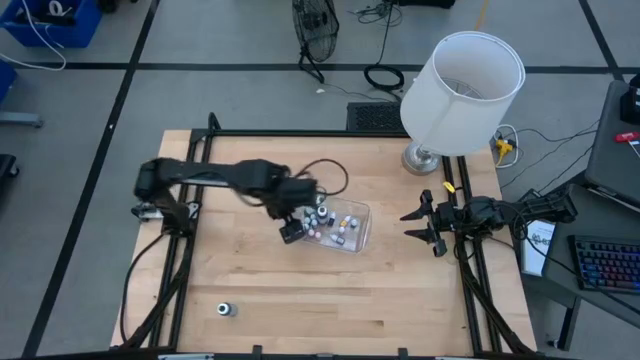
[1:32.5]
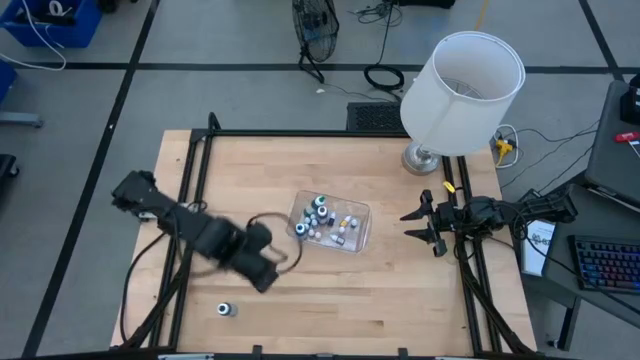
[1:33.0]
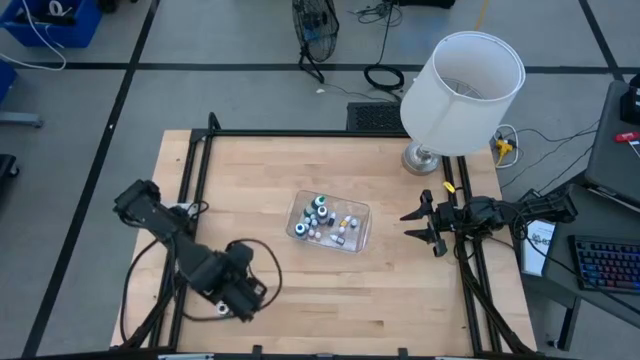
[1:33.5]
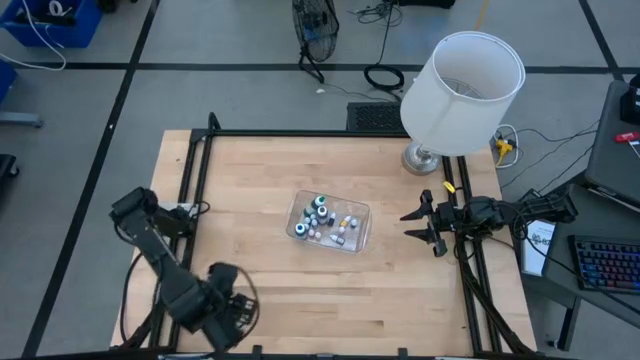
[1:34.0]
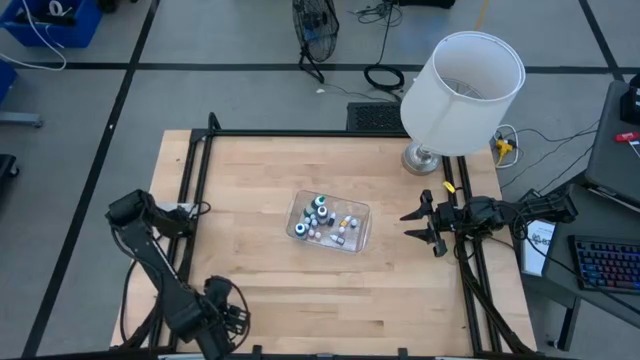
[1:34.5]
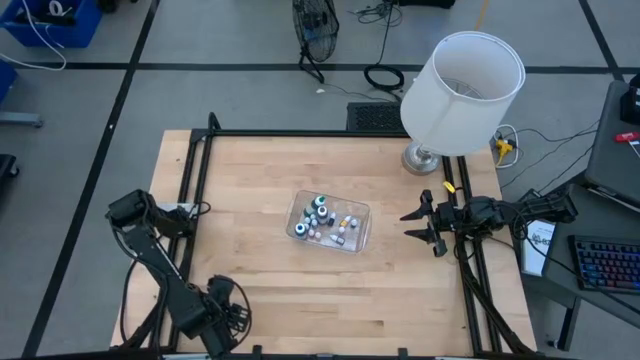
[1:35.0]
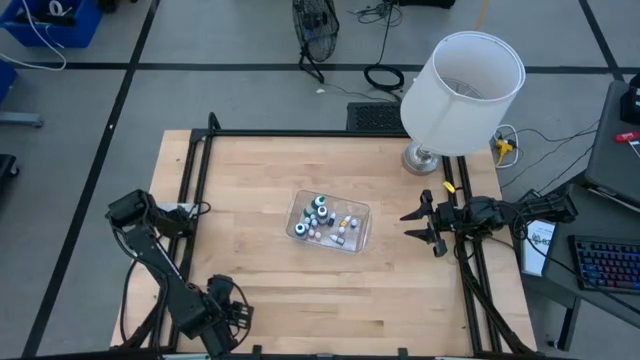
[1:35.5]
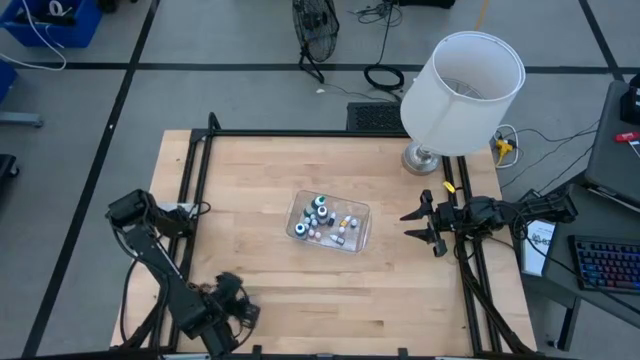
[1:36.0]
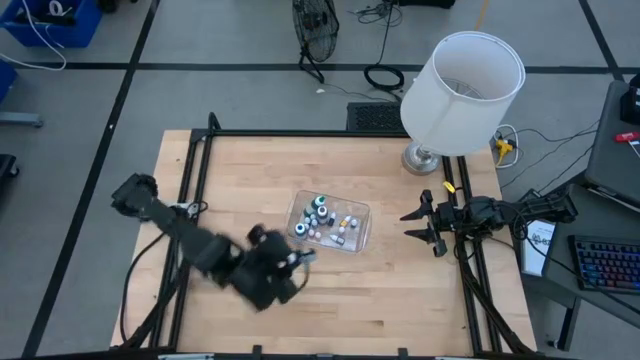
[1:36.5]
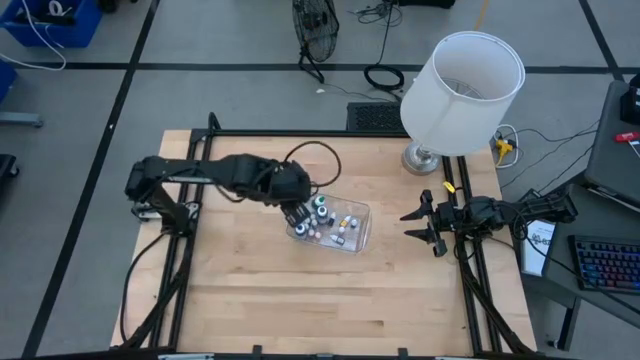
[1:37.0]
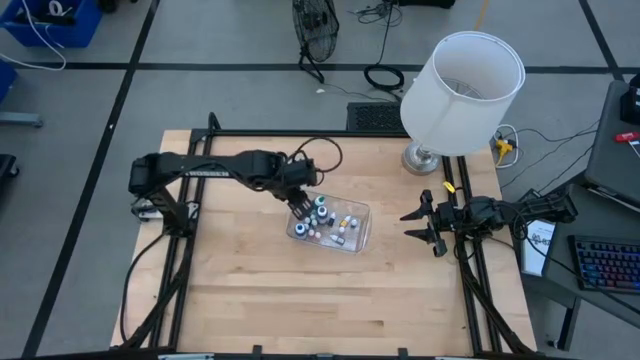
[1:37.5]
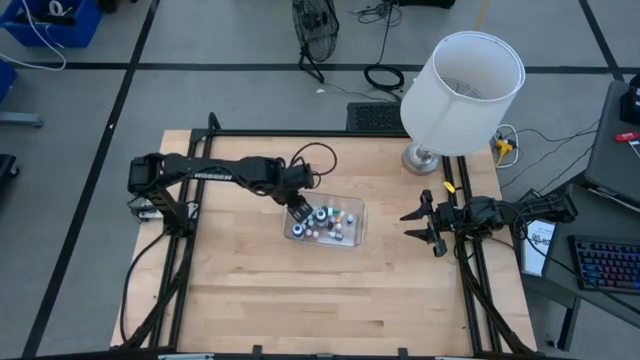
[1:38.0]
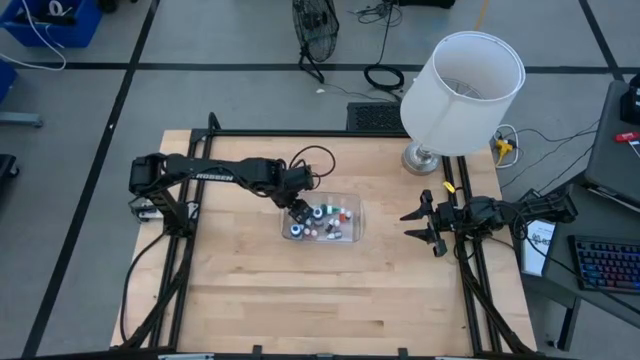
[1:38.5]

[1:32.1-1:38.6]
Task: Pick & Place food coloring
Put the large black food coloring bottle into the transparent bin

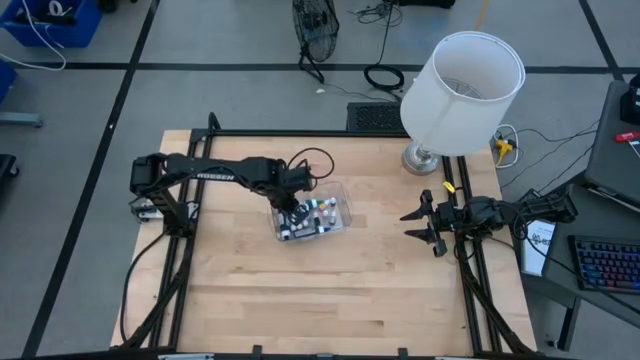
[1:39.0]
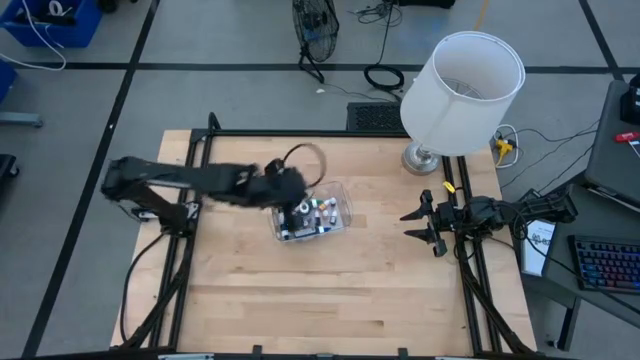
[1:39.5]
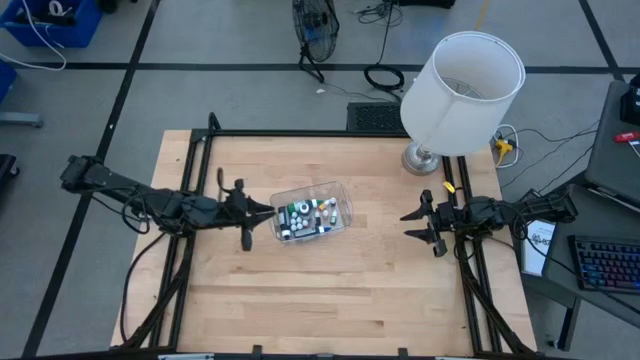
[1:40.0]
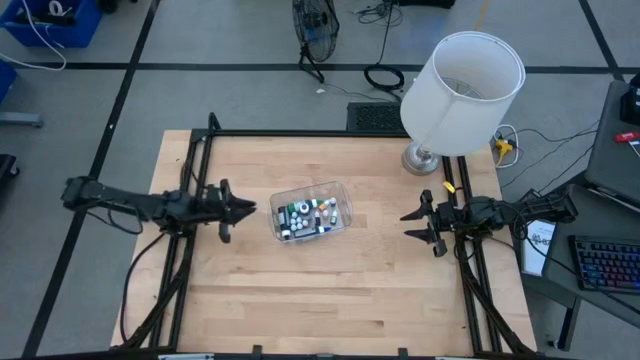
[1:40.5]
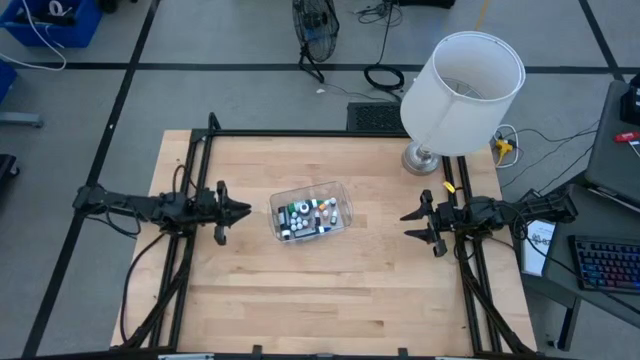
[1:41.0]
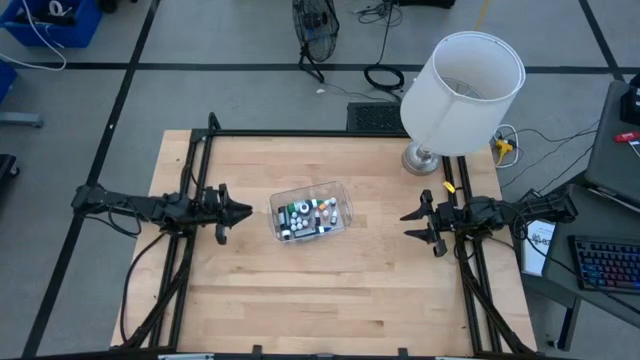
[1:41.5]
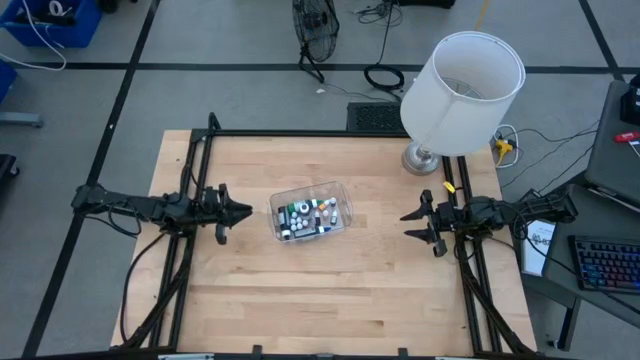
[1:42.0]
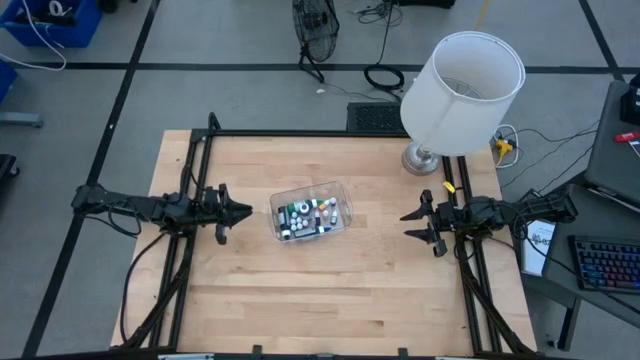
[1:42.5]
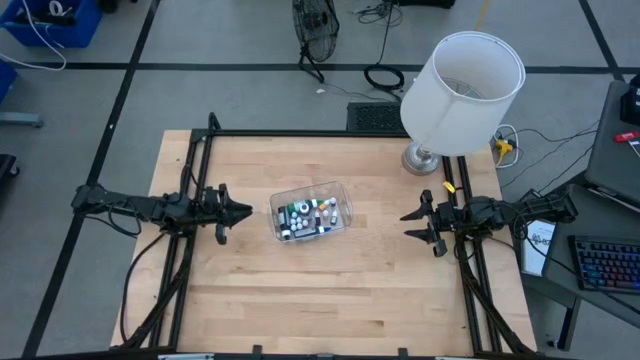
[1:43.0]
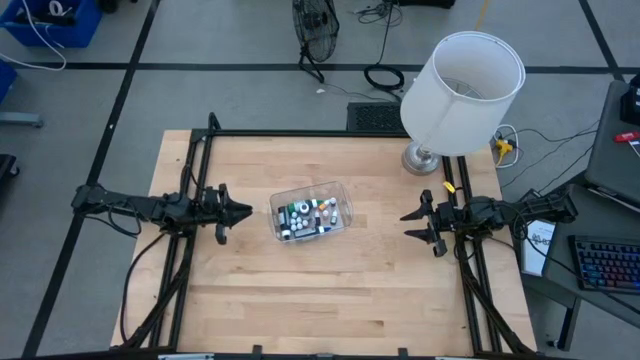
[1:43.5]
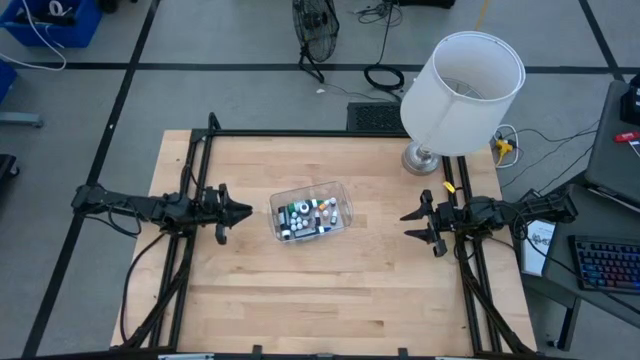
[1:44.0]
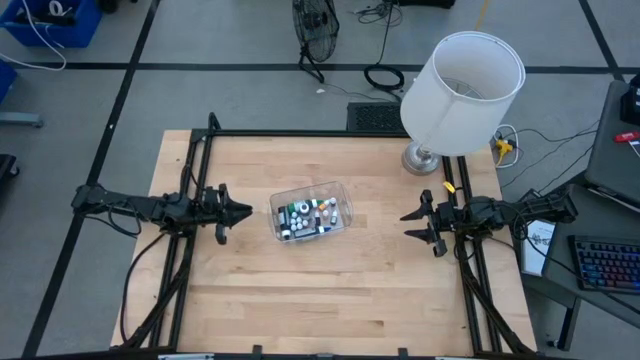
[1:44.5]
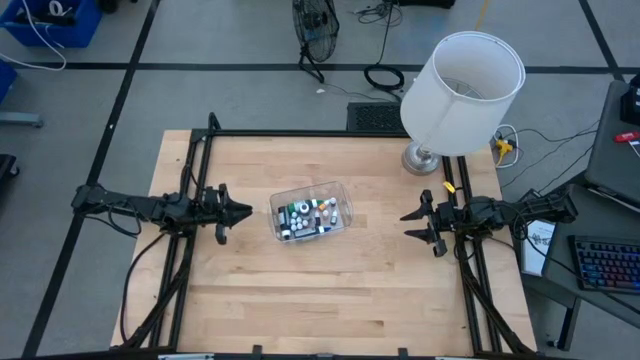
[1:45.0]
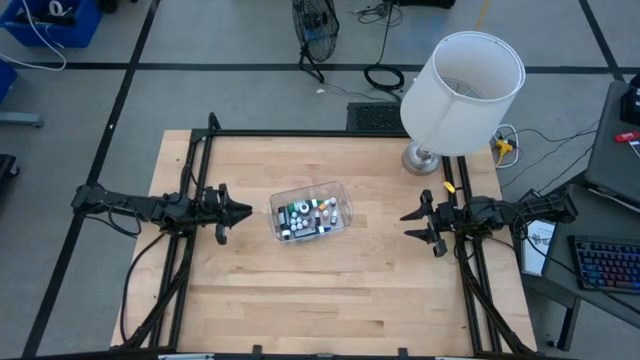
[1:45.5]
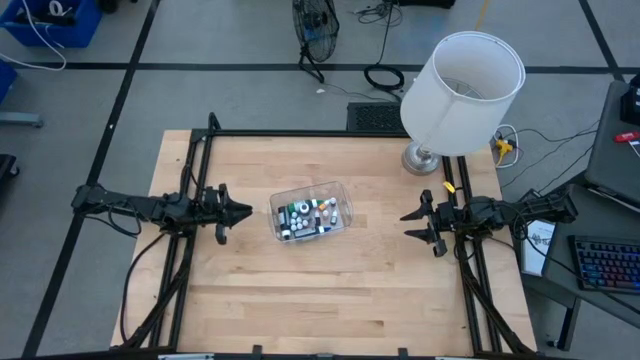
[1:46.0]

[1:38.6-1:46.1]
Return to Home Position

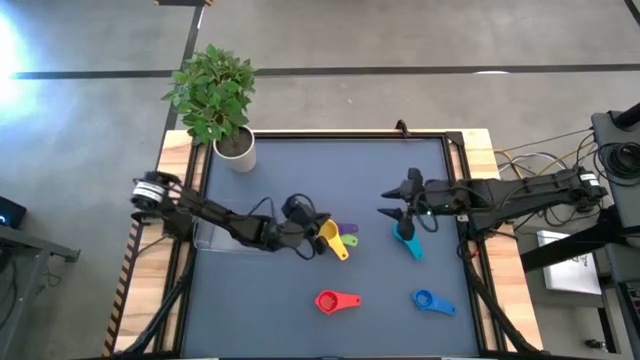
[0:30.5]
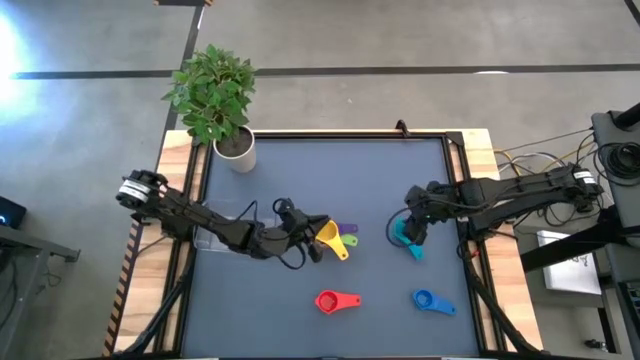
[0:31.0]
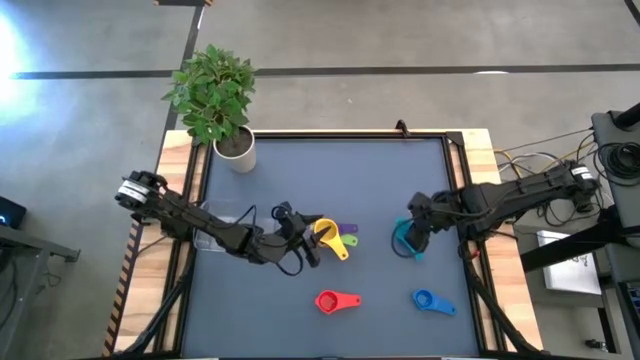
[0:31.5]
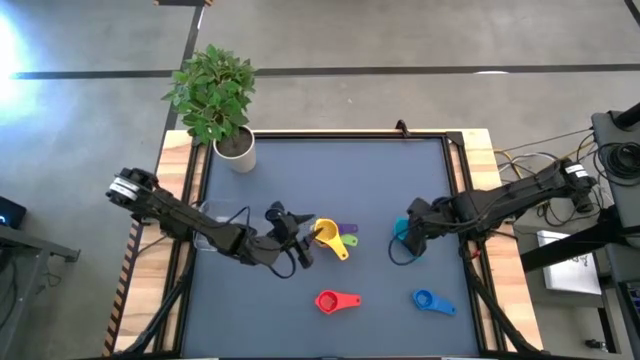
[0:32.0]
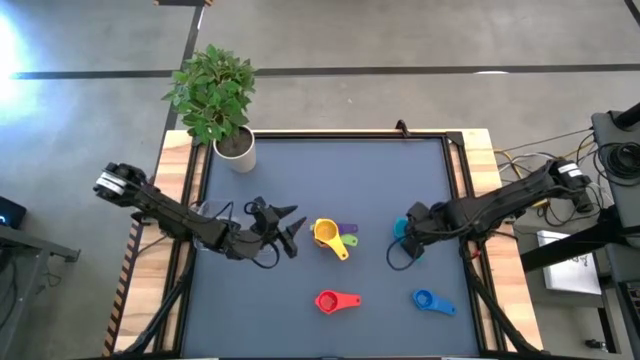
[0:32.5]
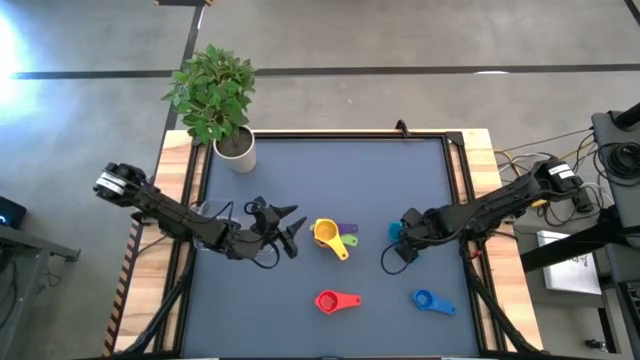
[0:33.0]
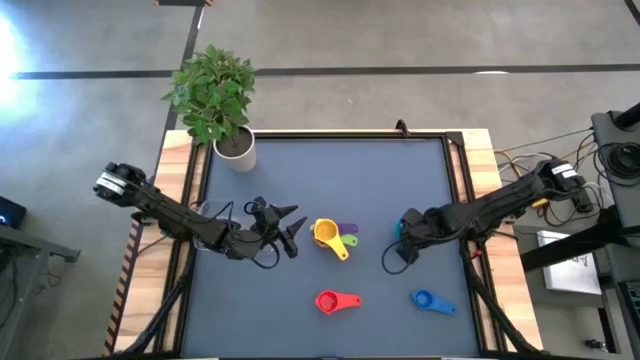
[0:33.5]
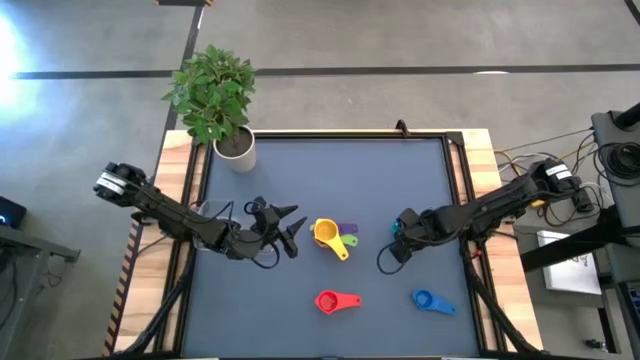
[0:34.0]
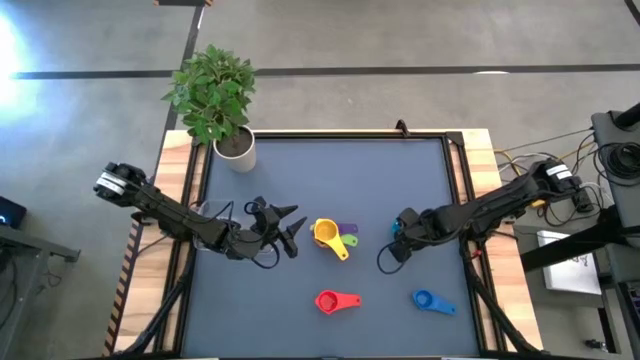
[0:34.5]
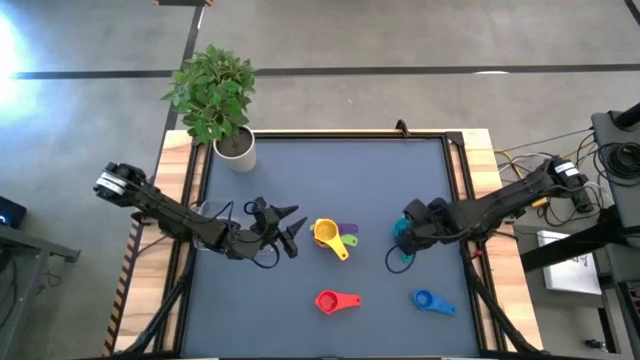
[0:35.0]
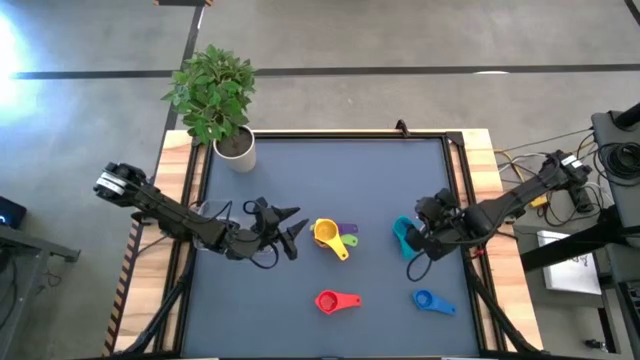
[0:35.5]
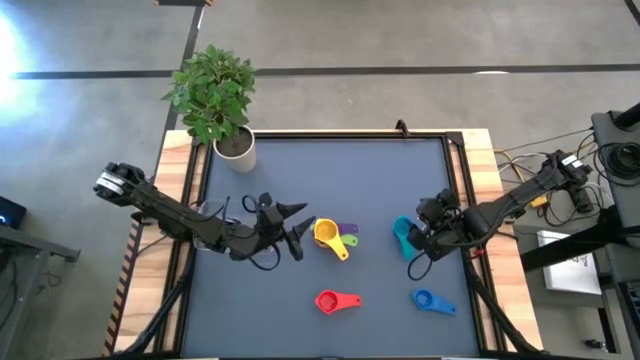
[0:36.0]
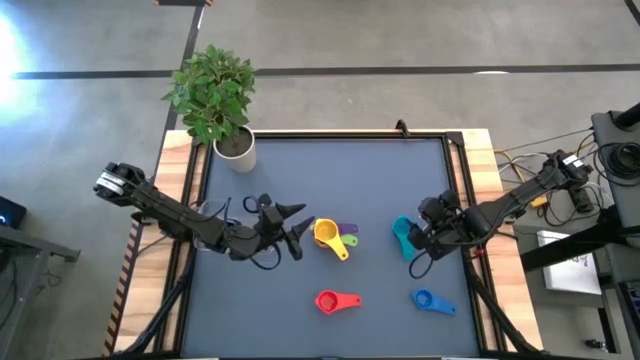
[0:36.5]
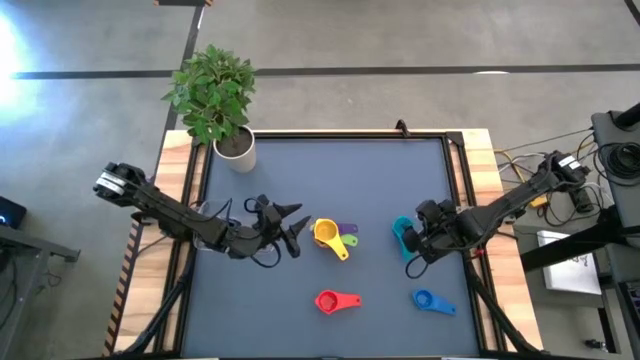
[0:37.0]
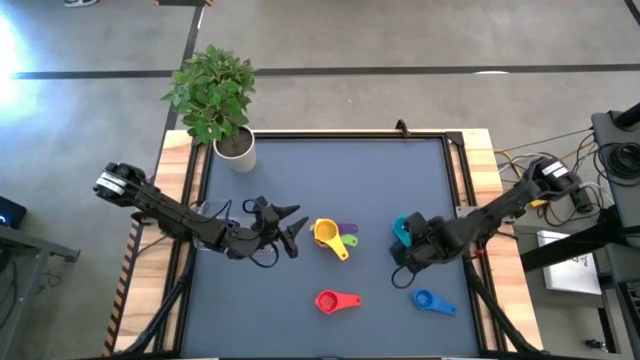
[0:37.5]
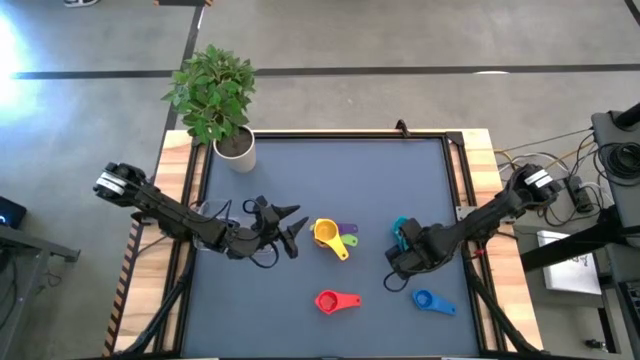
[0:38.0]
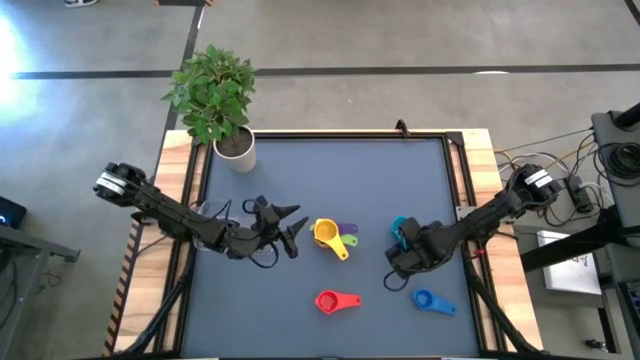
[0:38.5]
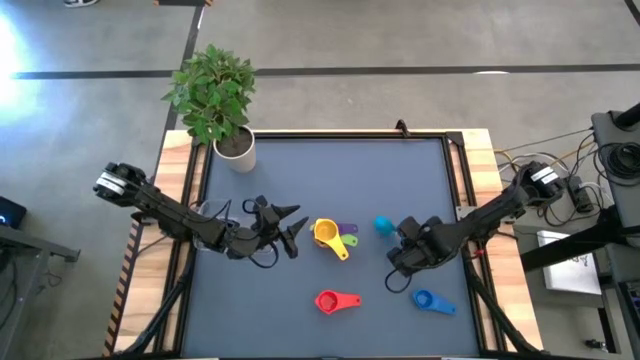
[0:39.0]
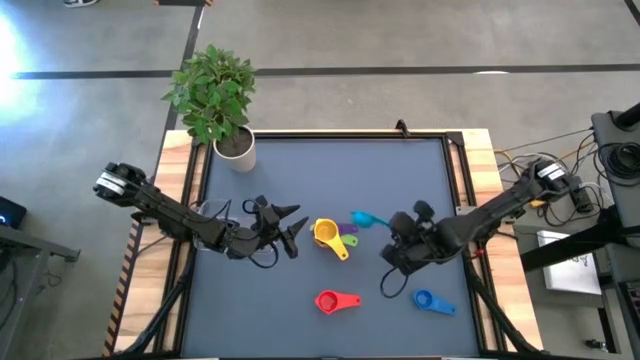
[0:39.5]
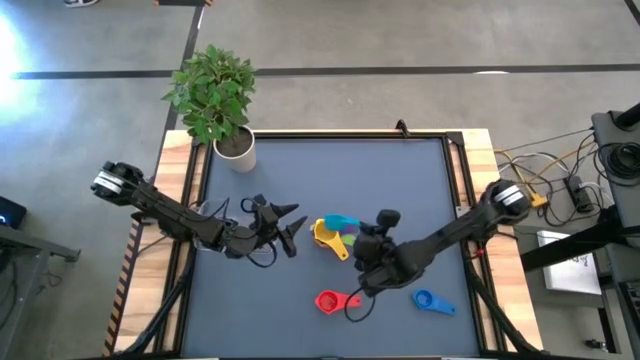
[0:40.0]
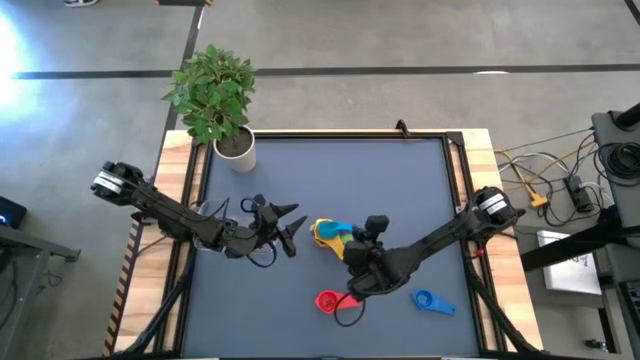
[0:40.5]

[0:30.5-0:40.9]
Task: Nest measuring cups in basket
Stack the light blue measuring cup on top of the yellow measuring cup
